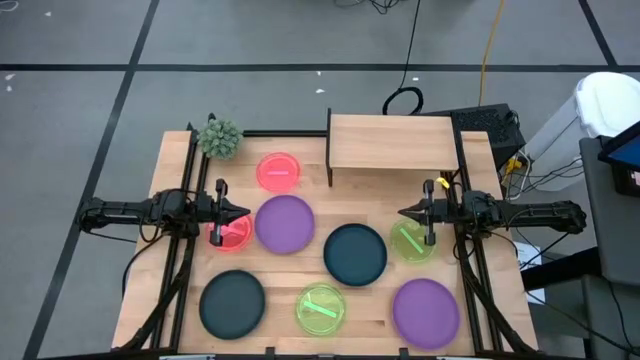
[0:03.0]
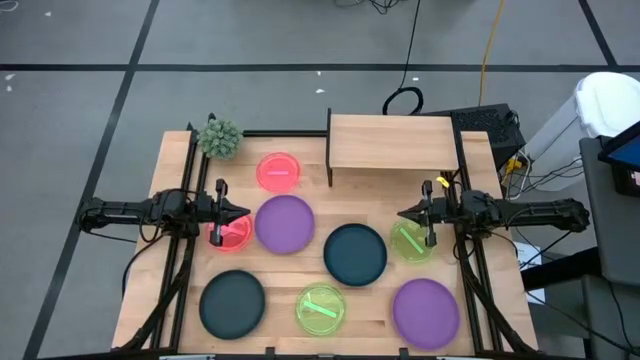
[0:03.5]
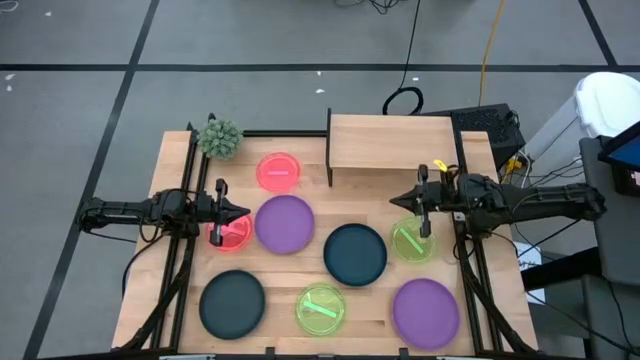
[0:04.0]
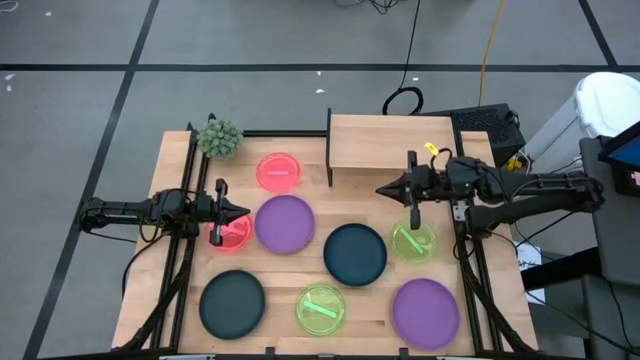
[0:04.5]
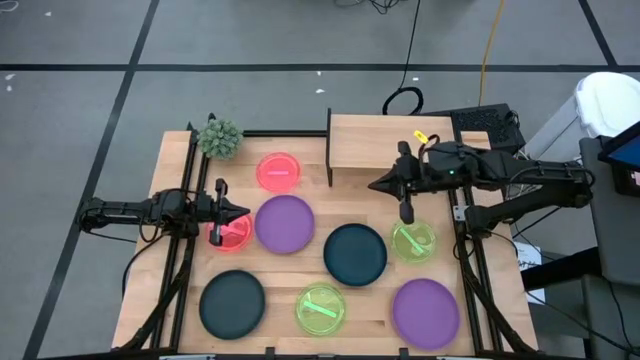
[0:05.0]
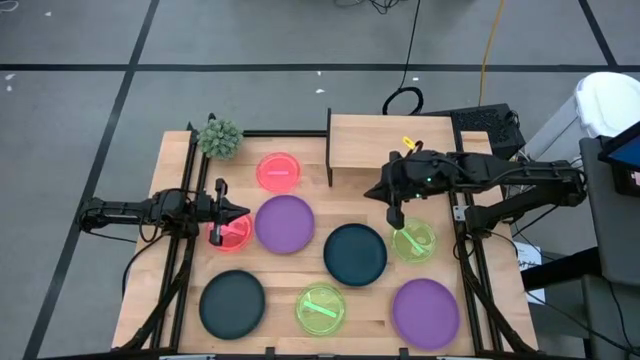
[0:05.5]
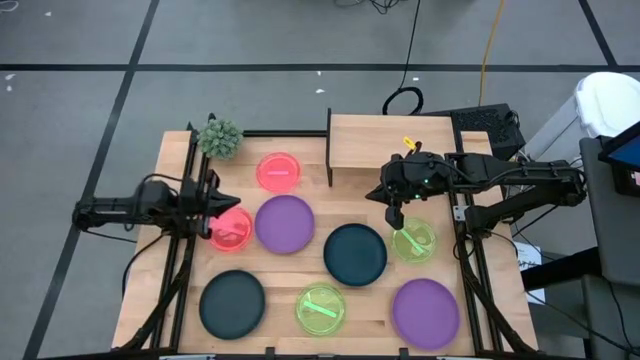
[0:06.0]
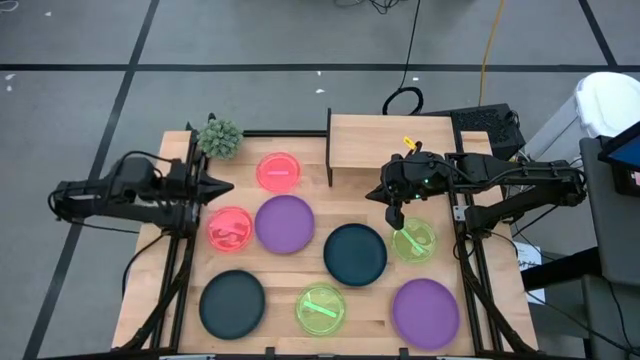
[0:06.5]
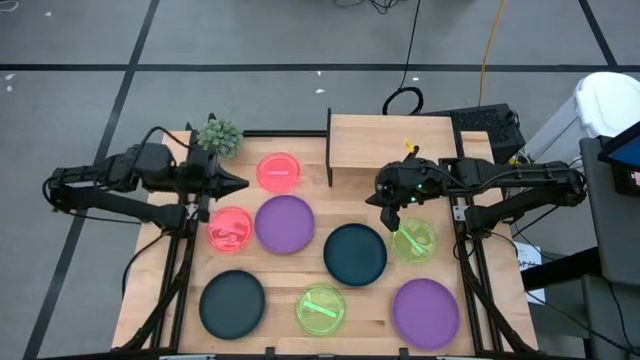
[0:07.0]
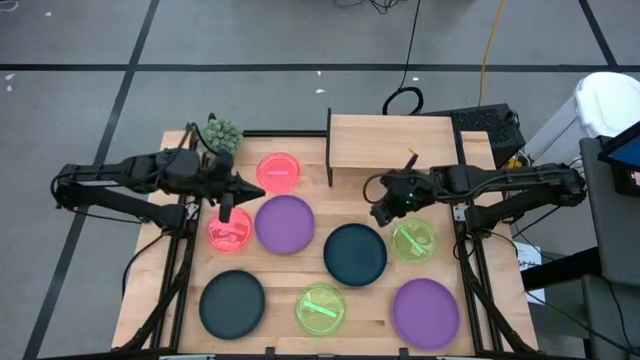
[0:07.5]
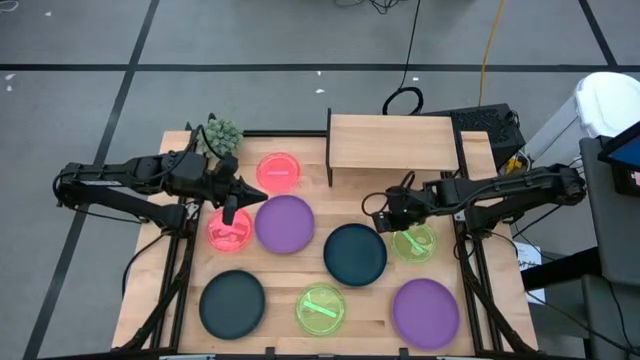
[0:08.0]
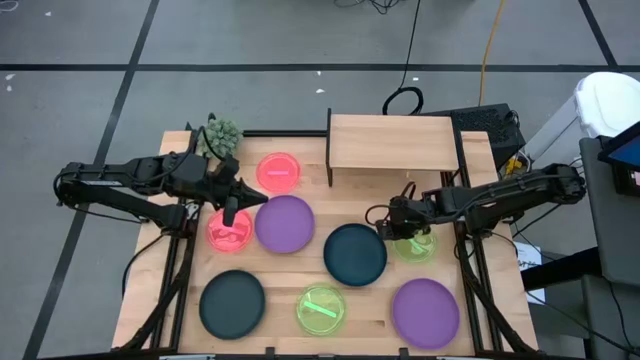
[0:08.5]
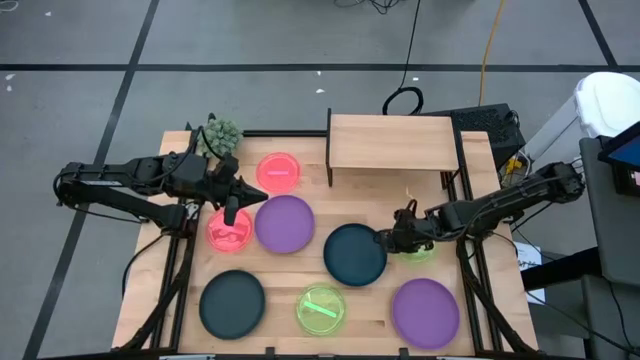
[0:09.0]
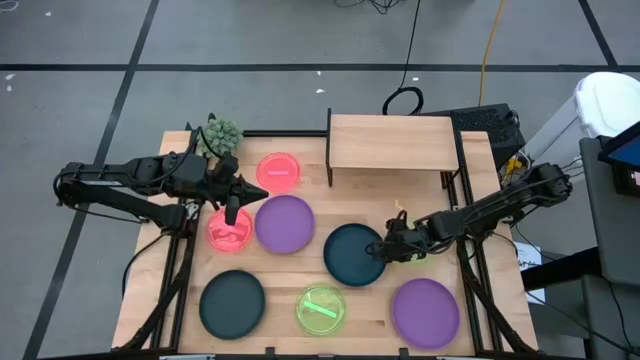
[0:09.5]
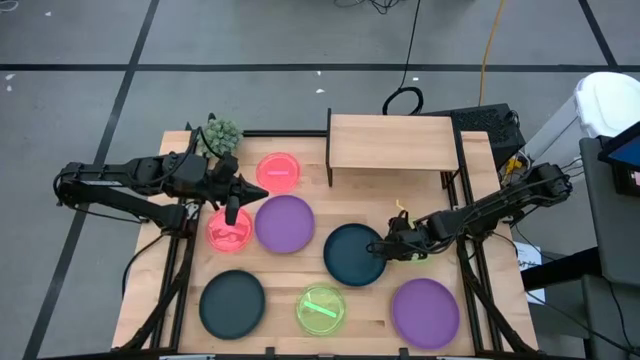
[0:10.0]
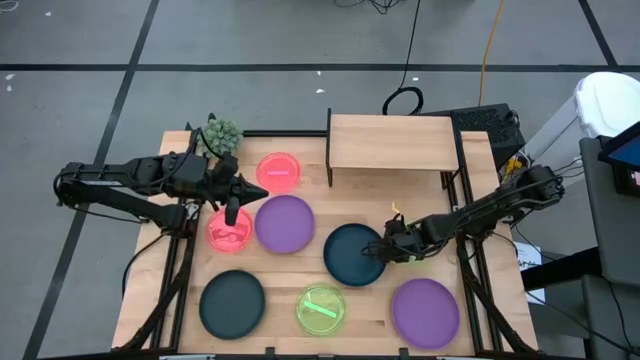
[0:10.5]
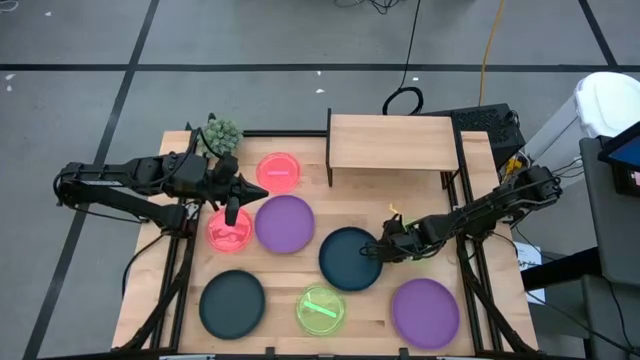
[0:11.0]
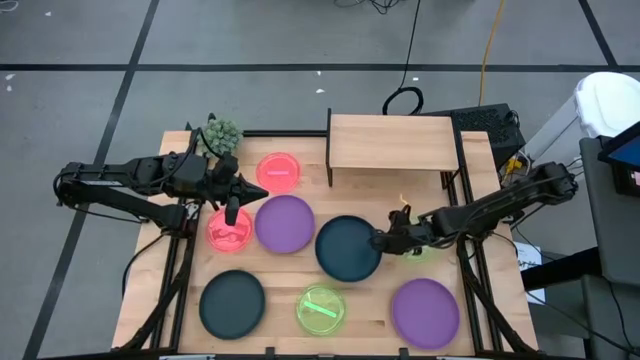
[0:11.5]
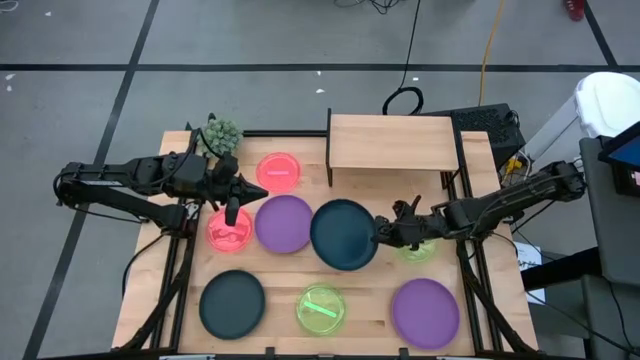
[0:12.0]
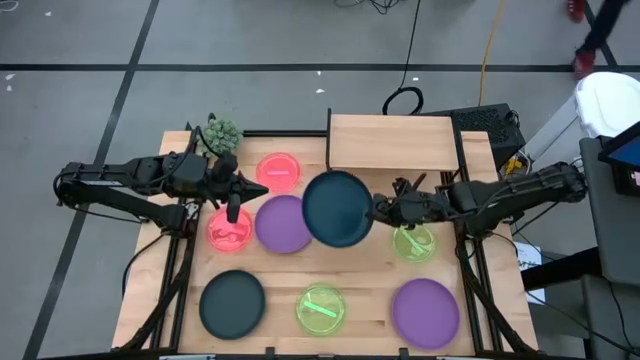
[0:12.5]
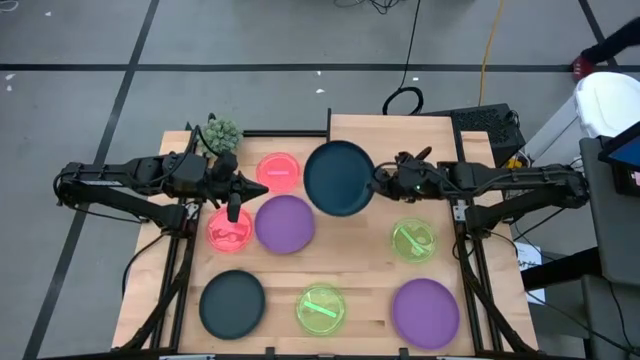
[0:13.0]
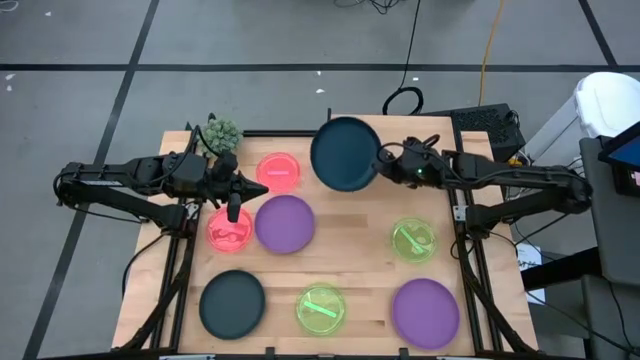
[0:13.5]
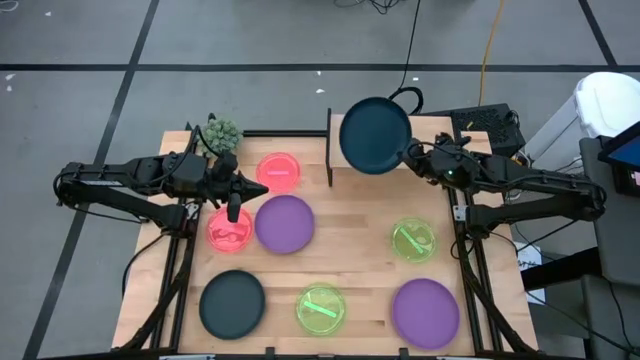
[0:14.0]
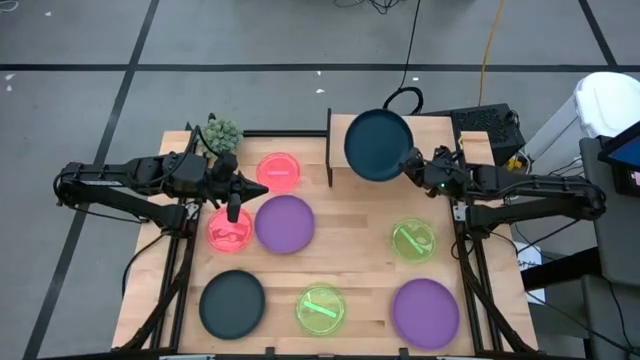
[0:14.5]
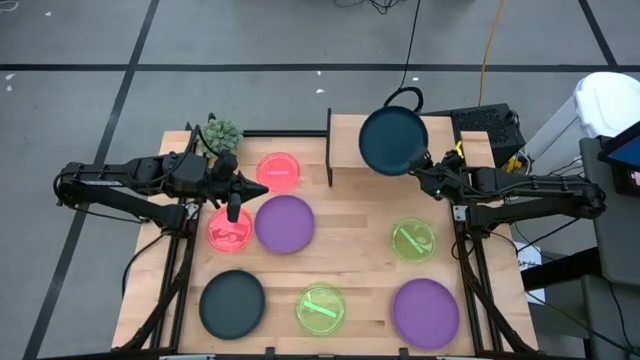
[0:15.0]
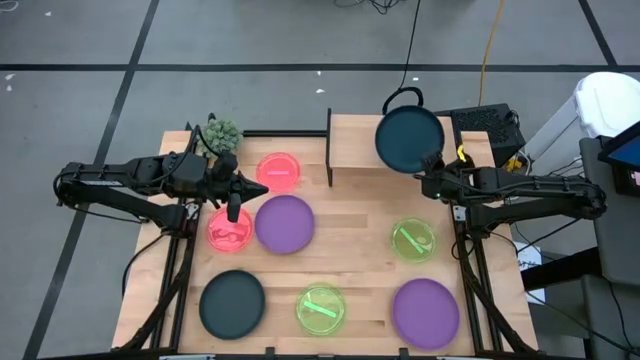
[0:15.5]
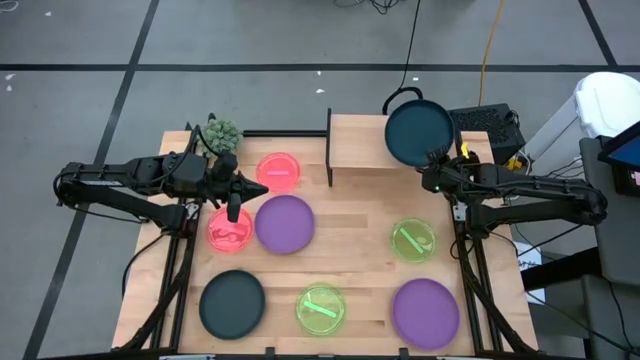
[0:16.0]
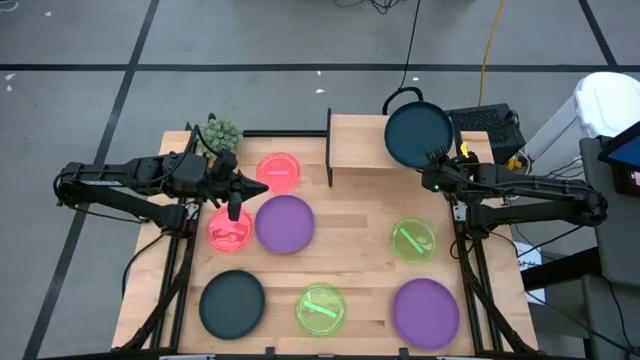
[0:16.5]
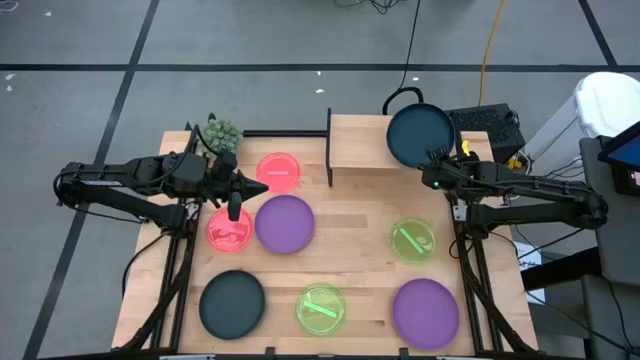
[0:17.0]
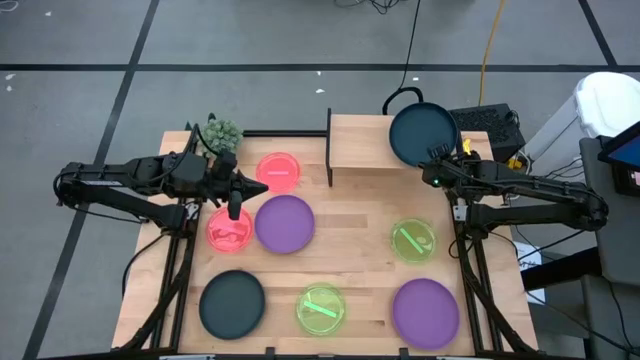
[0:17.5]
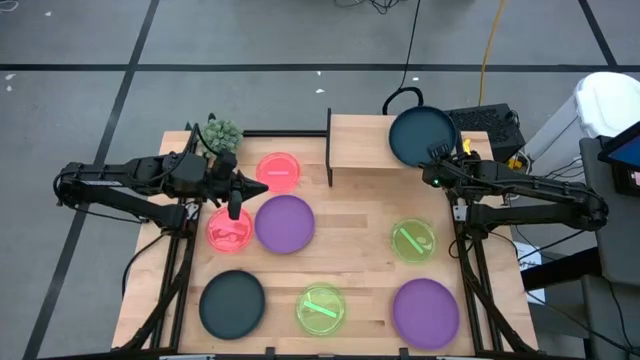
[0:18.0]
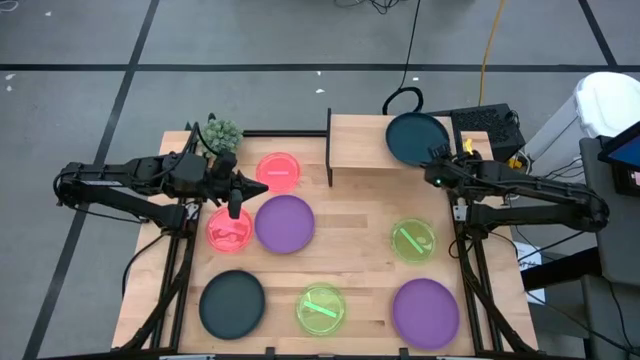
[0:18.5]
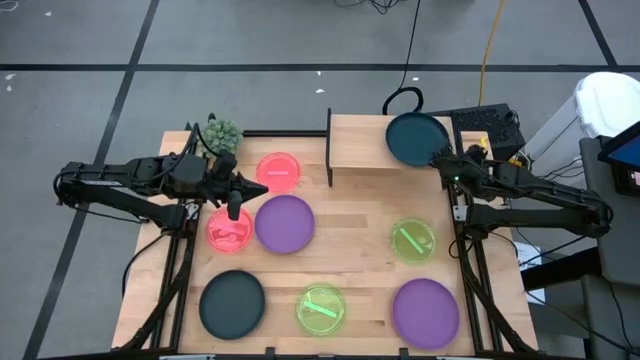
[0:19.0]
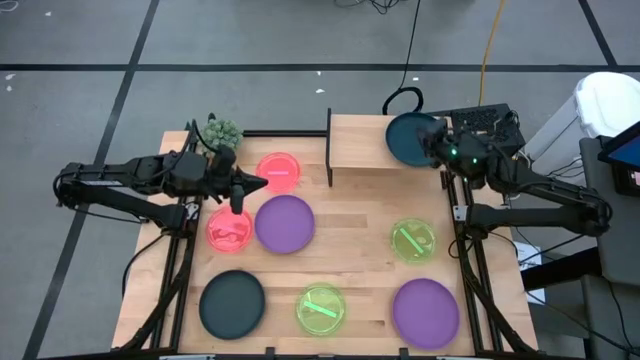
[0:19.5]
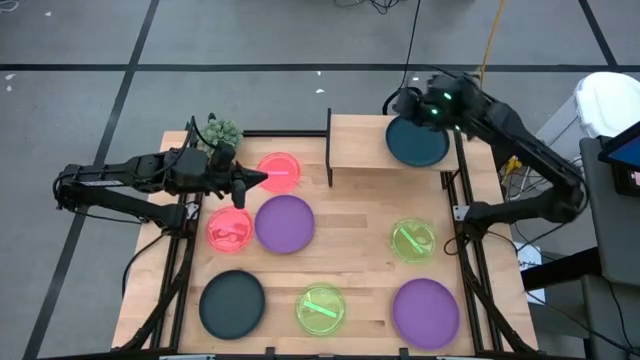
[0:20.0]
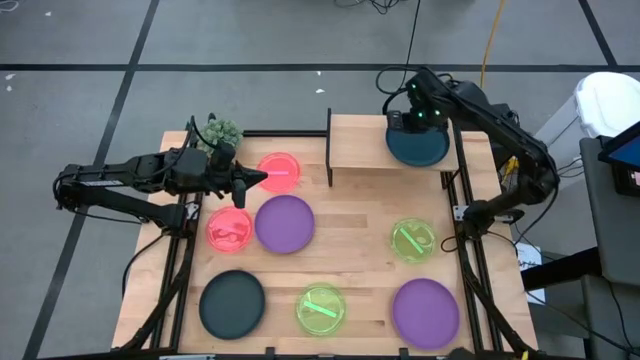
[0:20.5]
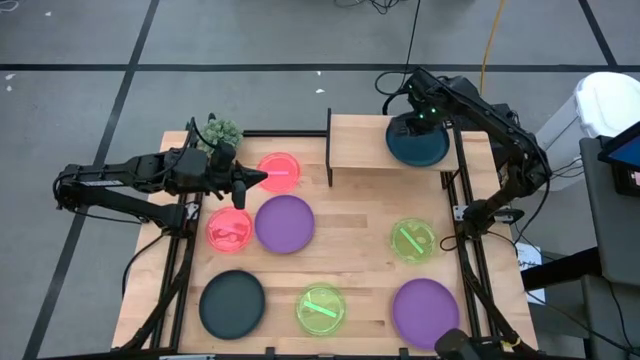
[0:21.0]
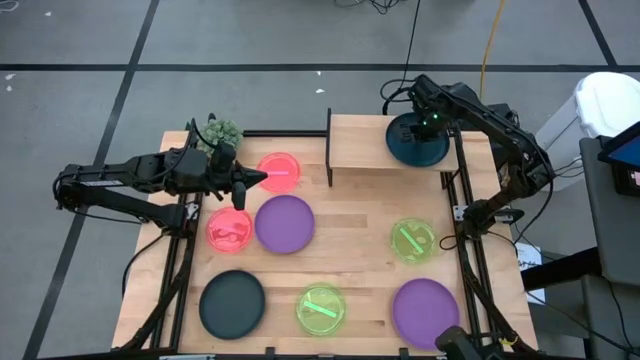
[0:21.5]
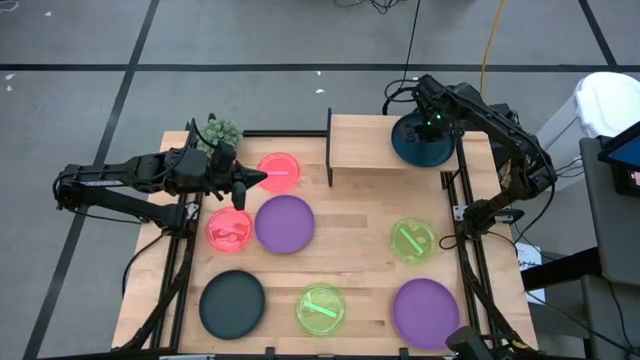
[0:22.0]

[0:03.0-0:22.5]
Task: Place and stack plates onto a shelf
Put the right black plate on the shelf
